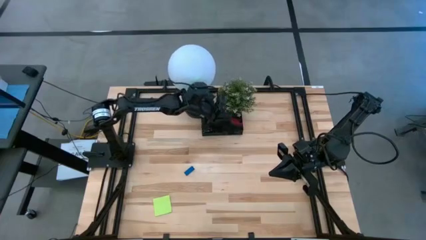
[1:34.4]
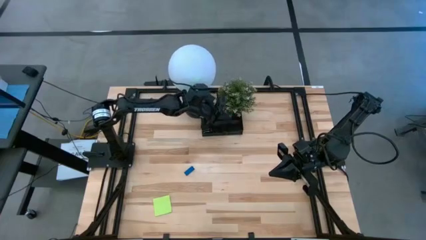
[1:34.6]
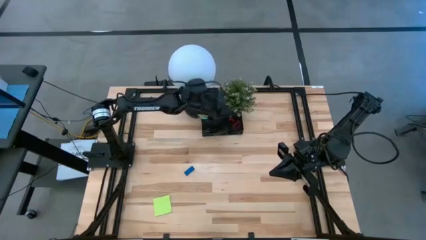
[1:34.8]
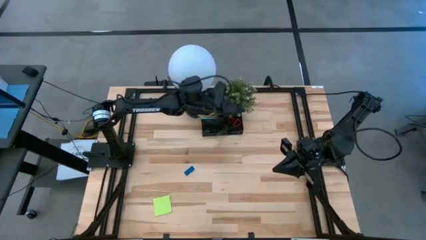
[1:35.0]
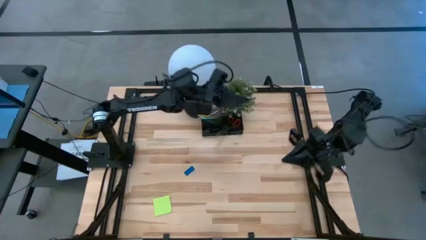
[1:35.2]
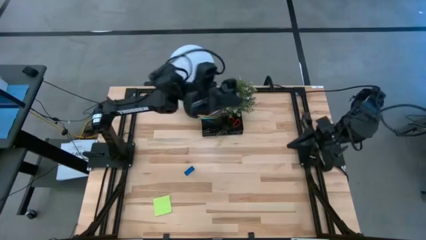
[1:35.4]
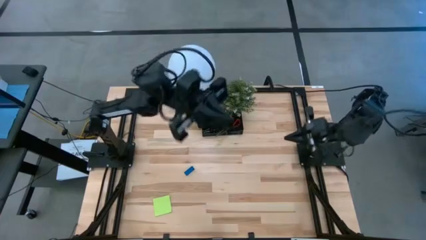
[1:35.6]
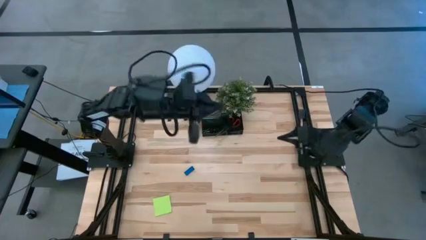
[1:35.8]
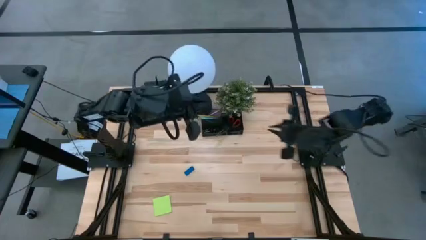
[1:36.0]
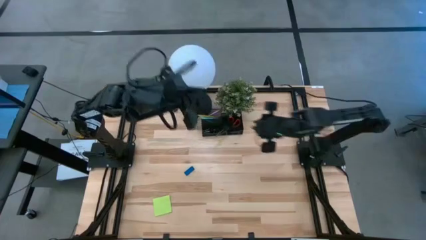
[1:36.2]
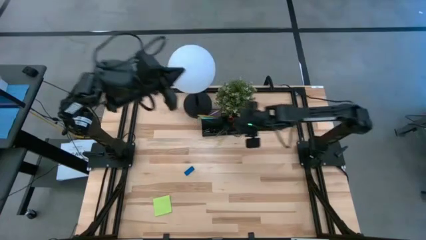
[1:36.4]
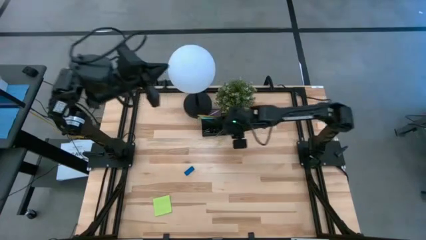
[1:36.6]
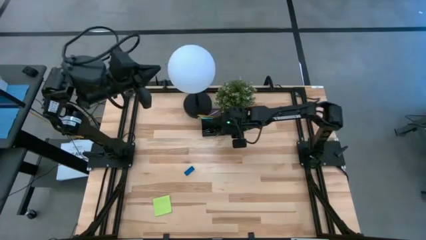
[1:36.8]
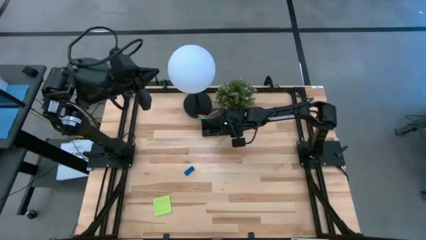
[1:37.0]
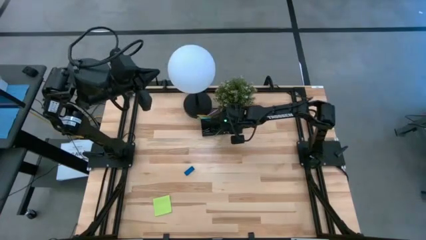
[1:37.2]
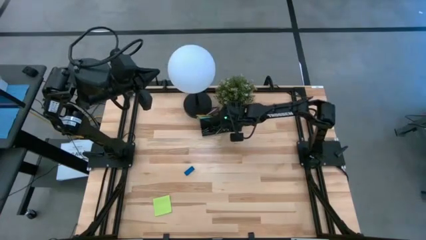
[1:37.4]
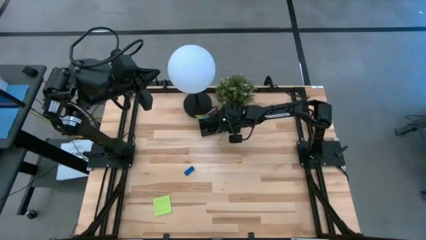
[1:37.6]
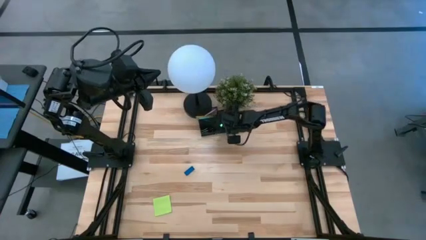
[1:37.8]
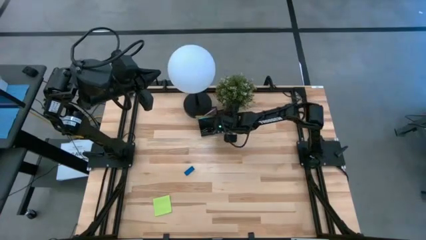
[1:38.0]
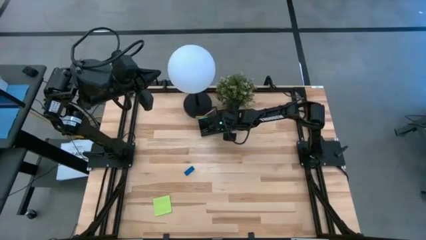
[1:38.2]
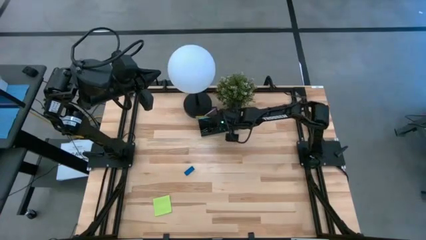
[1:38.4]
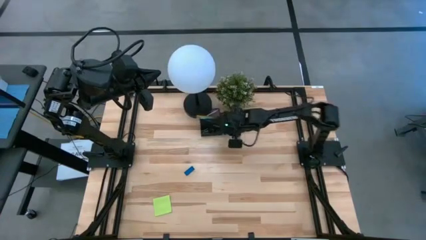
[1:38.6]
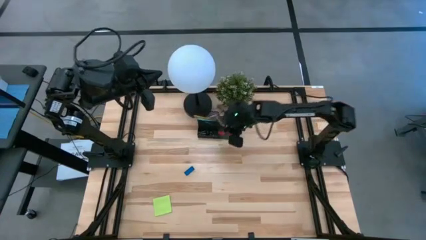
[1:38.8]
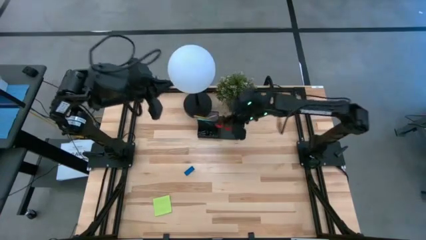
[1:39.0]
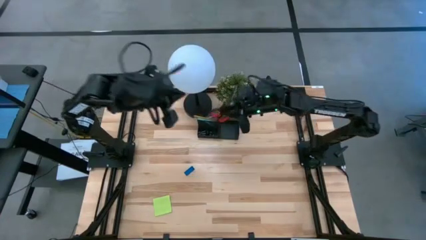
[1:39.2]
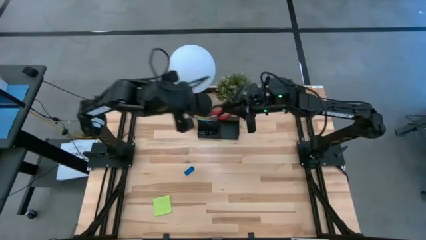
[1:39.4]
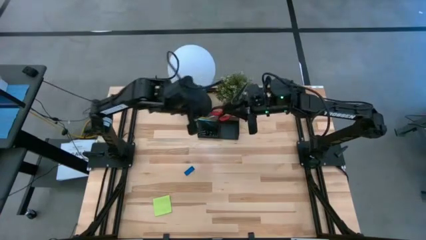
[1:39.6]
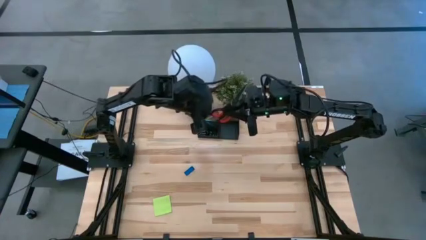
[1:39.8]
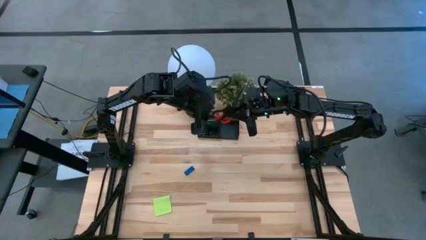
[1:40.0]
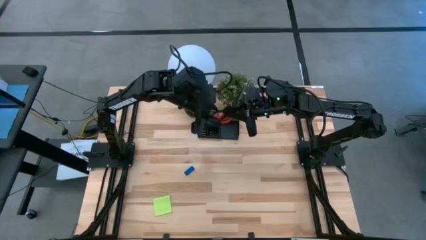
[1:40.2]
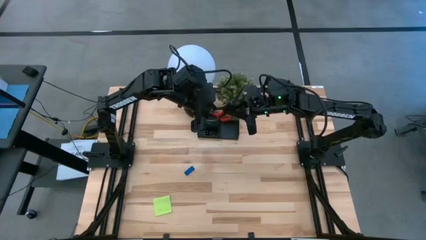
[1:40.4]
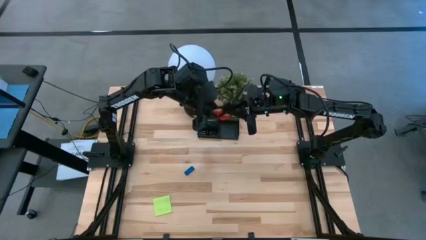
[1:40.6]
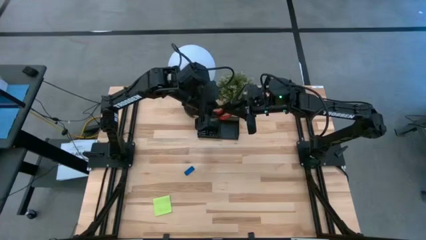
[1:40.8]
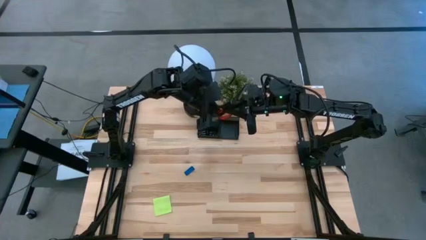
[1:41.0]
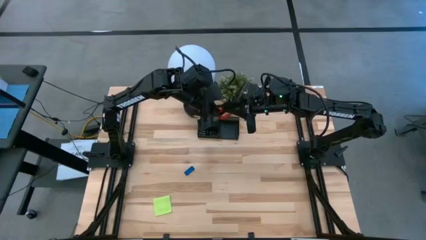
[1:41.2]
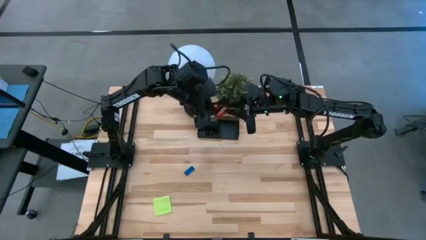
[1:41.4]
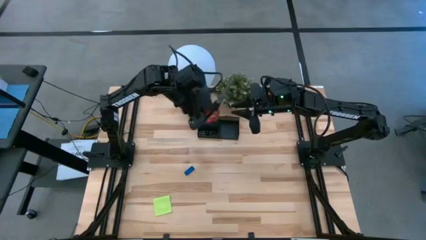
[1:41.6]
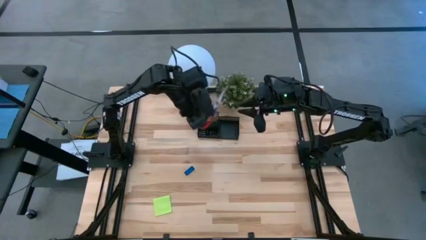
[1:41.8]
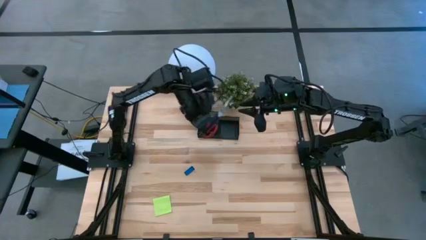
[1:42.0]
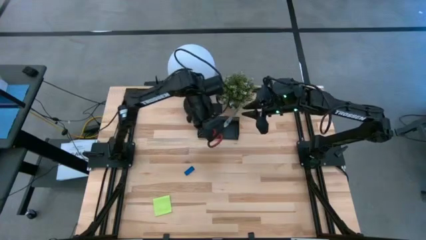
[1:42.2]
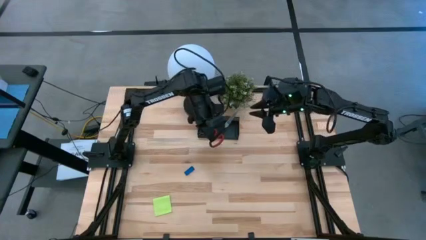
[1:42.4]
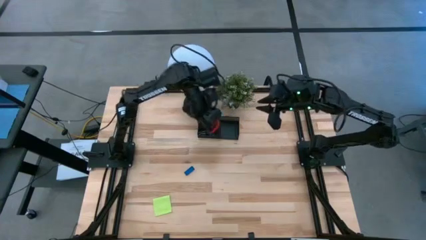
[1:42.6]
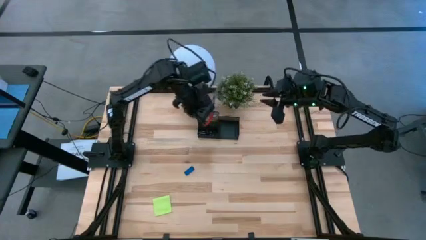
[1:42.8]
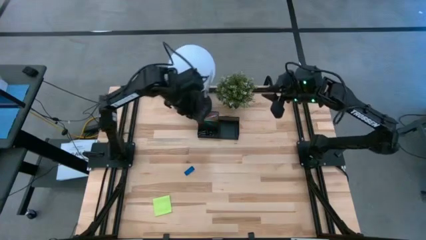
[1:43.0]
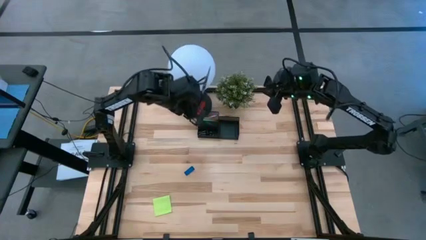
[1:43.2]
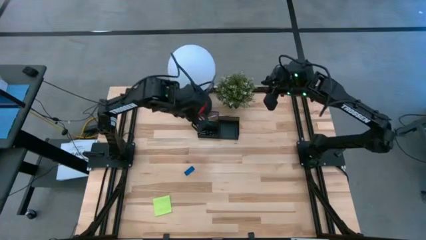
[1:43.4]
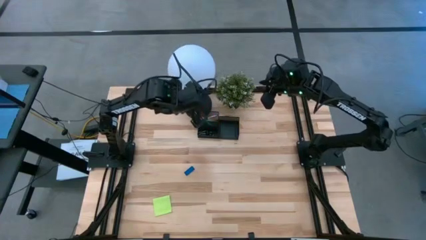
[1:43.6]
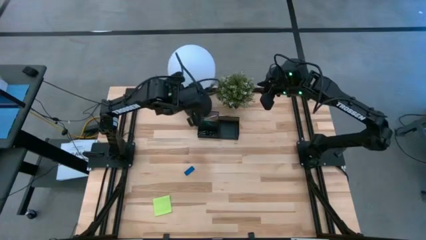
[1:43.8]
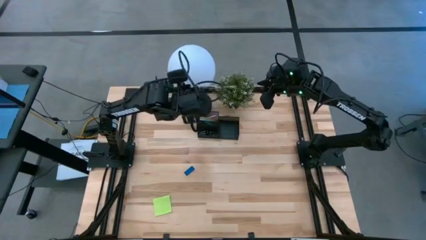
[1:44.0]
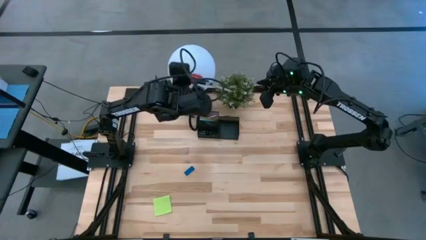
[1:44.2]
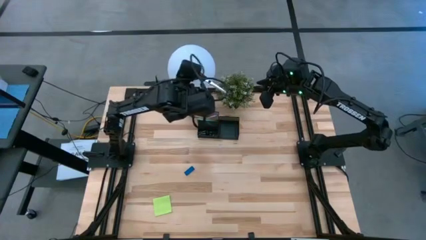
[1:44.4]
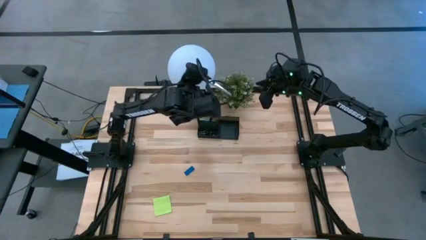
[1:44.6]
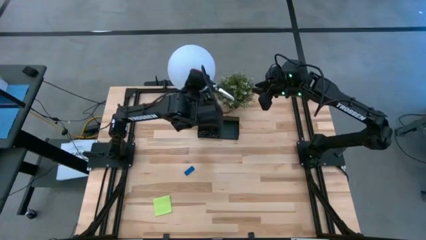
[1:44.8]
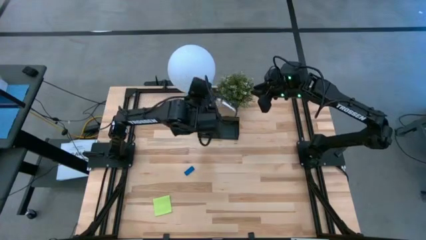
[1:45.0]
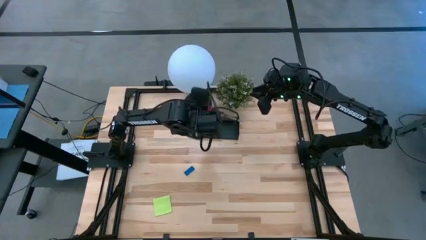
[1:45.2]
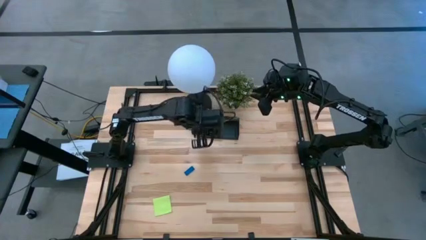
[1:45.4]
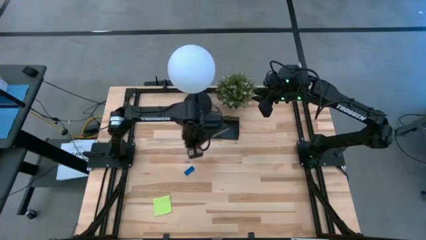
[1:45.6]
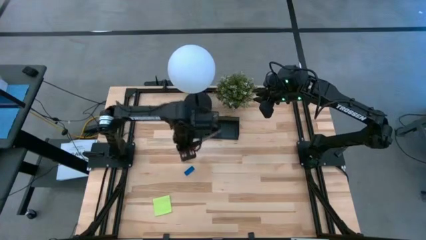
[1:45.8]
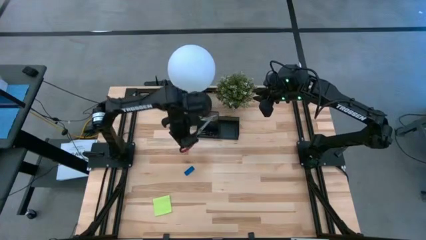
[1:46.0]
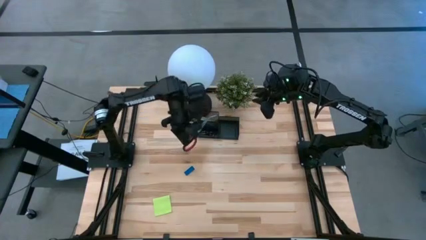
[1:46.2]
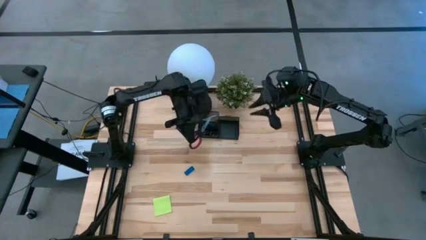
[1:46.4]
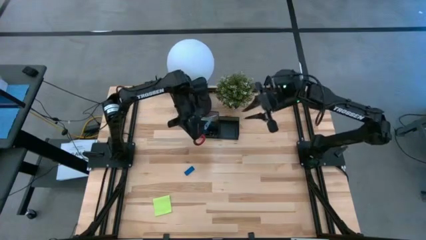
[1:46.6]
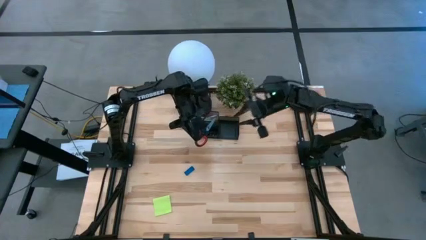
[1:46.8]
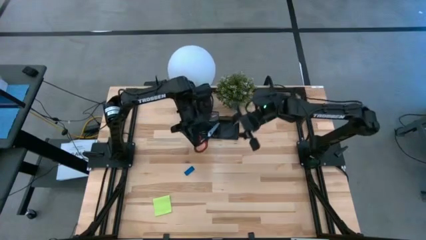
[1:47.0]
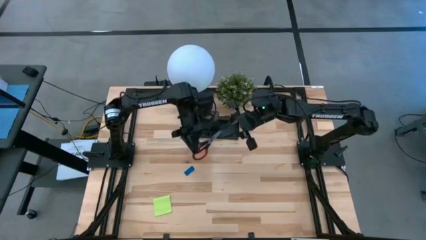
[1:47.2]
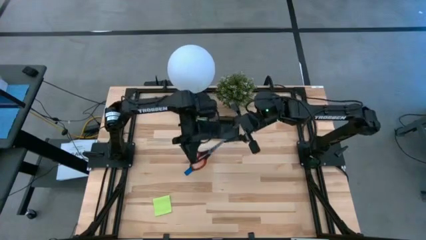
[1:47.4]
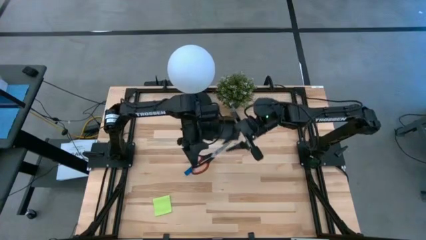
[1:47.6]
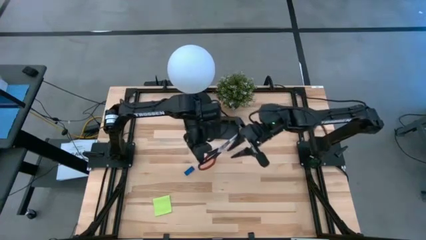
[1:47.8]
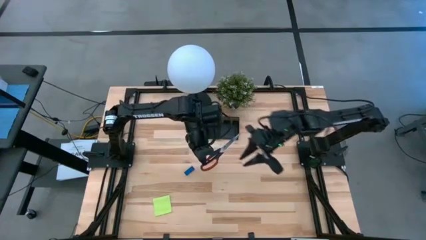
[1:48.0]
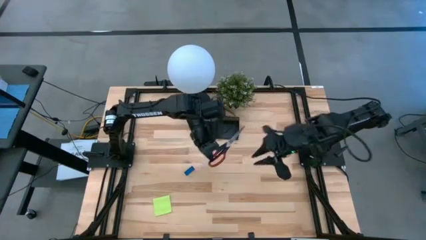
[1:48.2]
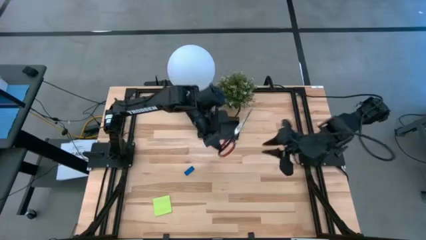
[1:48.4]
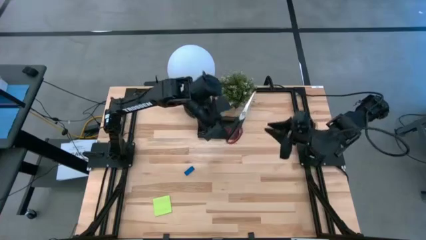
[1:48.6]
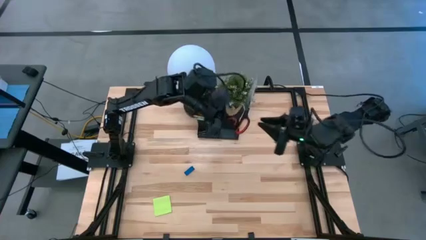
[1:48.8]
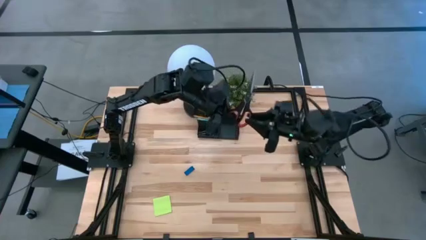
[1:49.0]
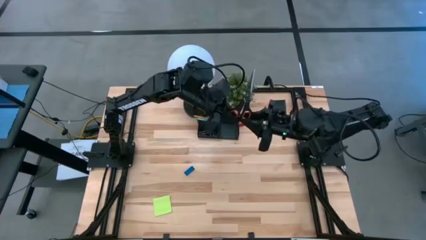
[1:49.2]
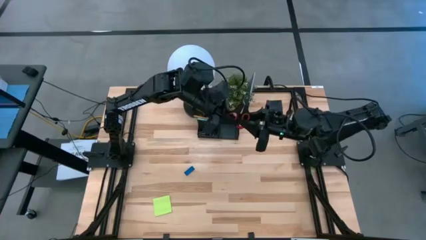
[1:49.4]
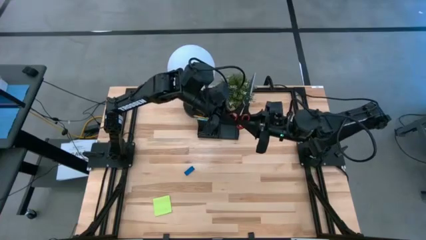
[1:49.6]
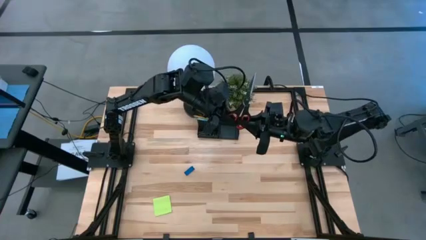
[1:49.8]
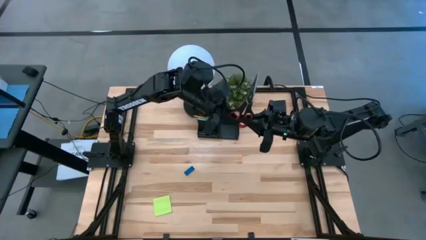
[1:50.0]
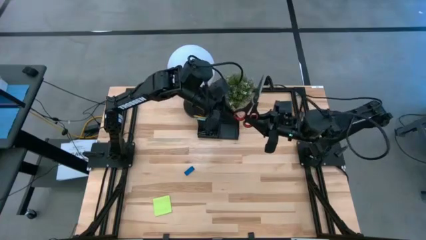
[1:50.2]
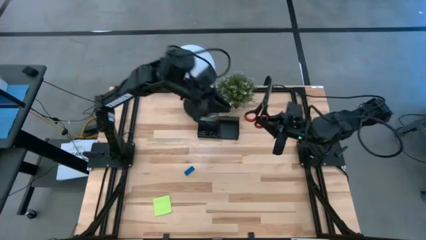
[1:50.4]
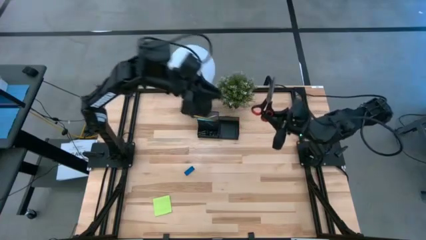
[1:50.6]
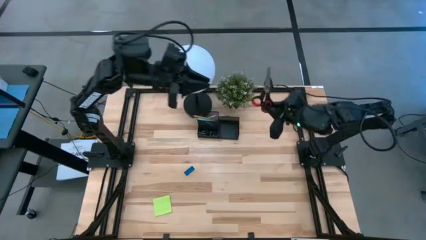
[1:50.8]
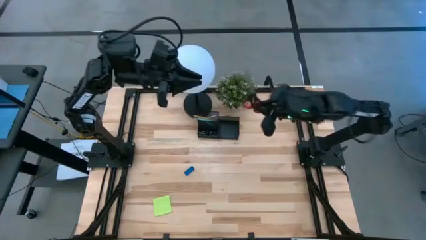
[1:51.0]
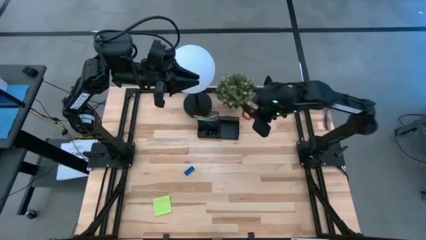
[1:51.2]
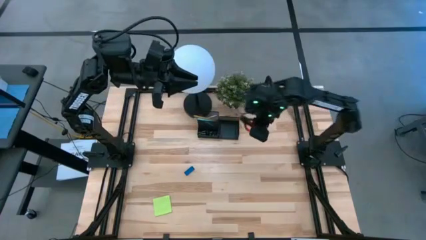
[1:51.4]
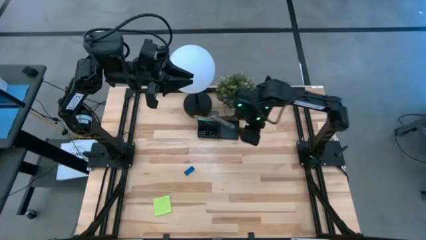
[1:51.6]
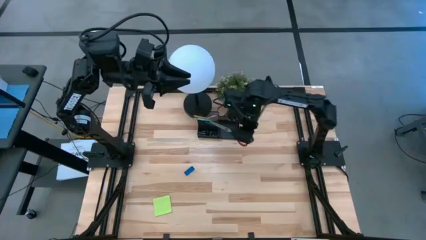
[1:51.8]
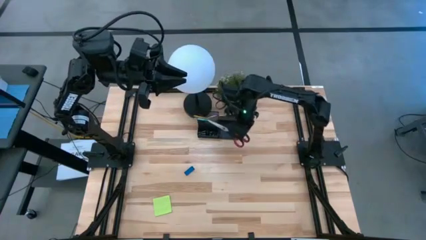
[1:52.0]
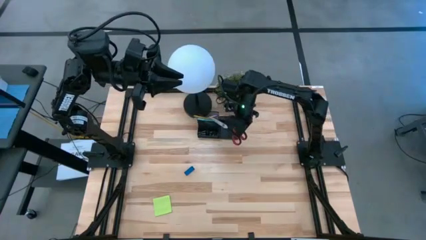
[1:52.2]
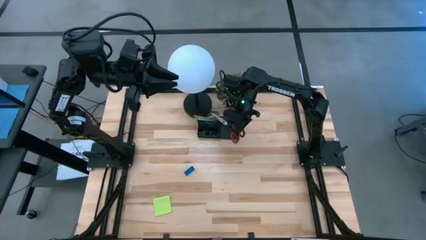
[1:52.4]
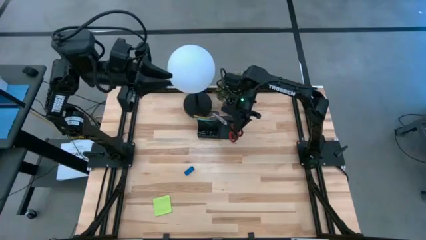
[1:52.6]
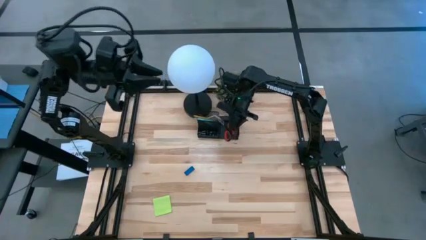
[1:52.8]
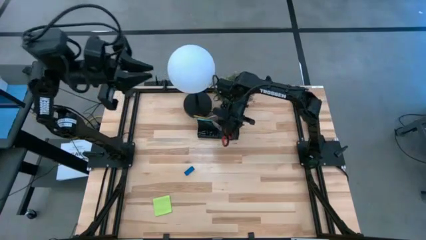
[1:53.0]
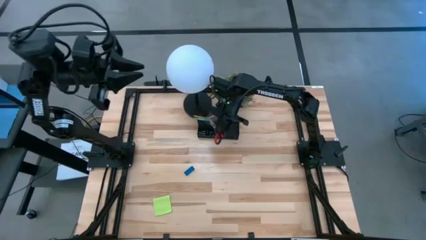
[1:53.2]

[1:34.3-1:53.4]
Task: Pick and place office supplies into organizer
Put the black scissors into the black desk organizer
